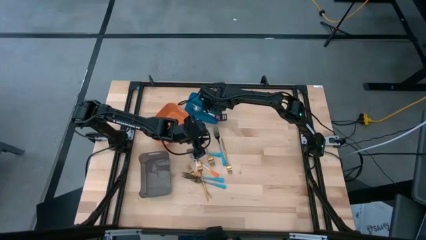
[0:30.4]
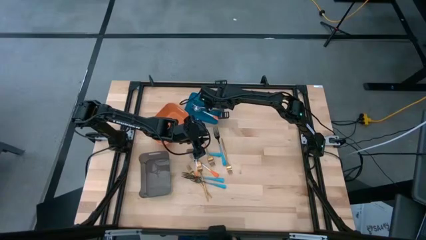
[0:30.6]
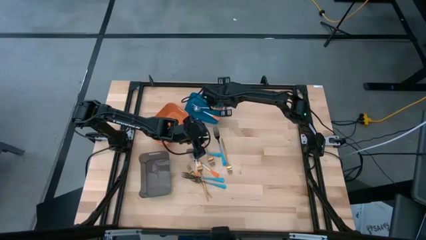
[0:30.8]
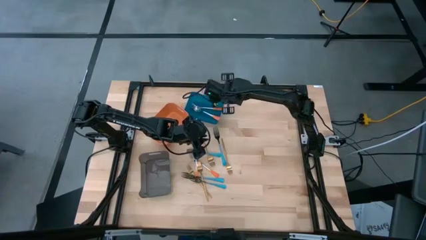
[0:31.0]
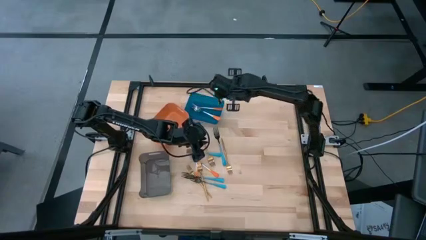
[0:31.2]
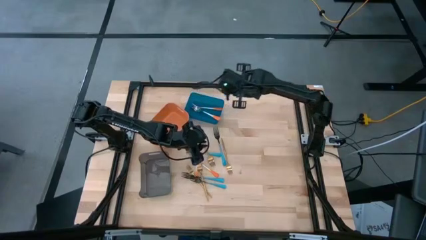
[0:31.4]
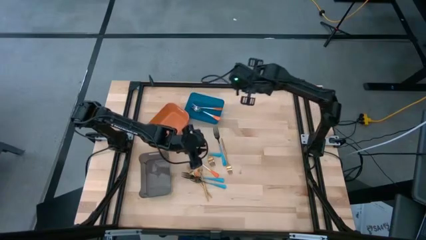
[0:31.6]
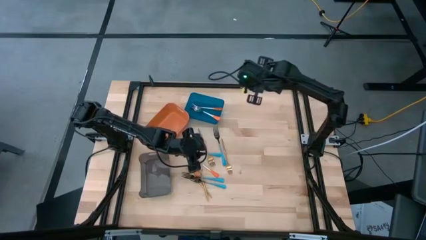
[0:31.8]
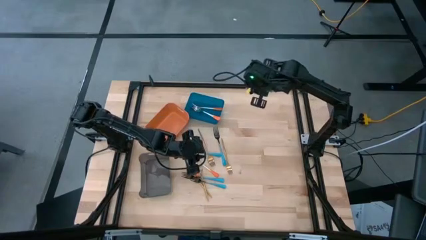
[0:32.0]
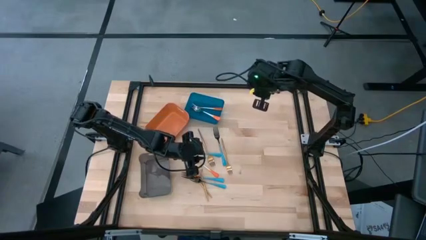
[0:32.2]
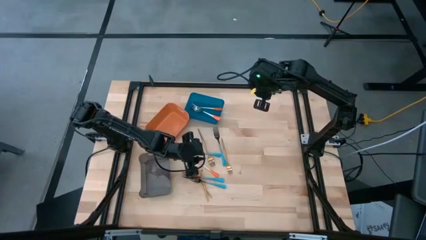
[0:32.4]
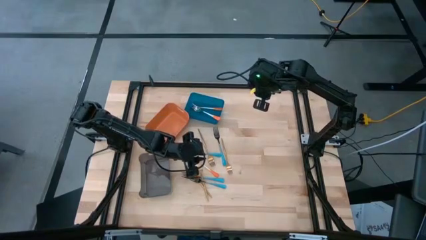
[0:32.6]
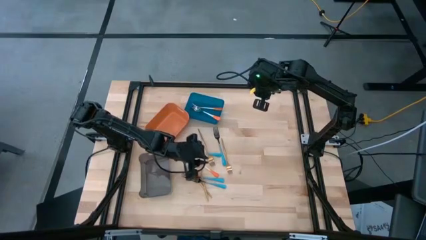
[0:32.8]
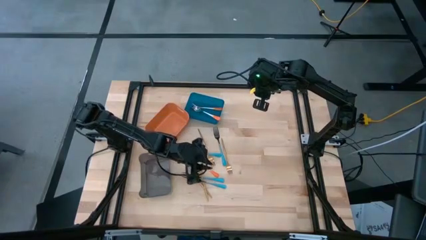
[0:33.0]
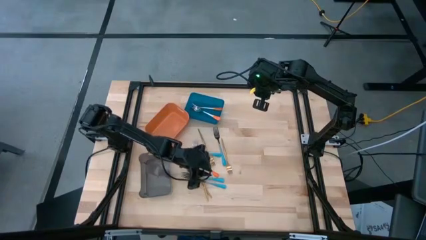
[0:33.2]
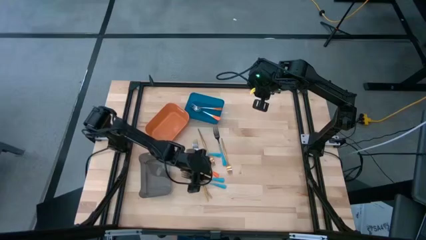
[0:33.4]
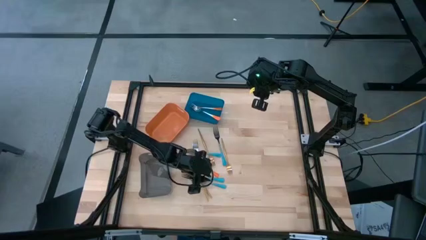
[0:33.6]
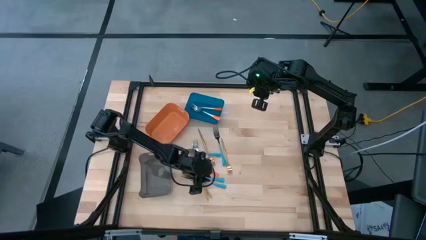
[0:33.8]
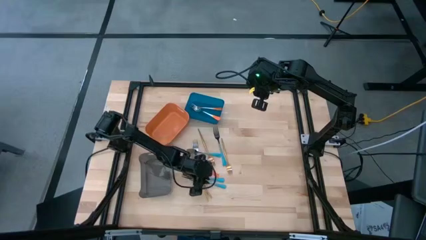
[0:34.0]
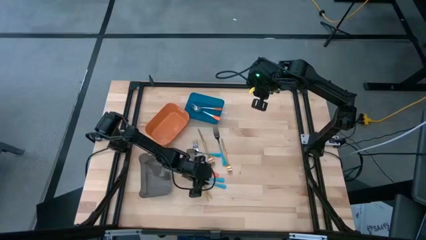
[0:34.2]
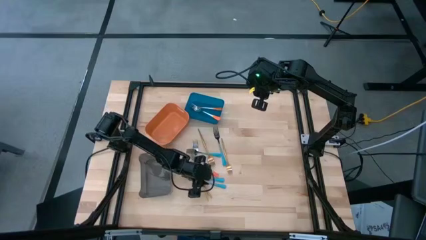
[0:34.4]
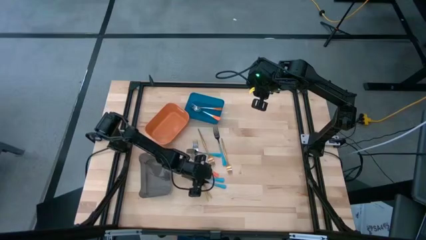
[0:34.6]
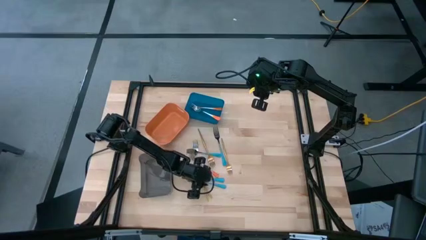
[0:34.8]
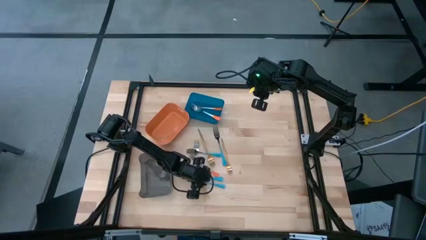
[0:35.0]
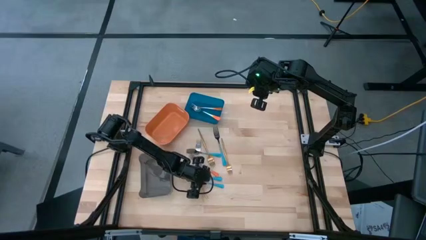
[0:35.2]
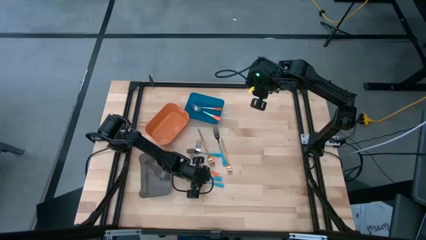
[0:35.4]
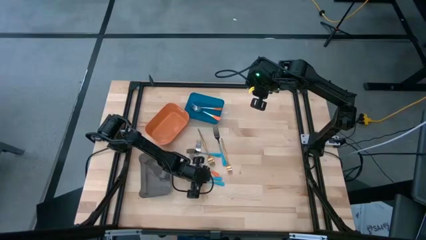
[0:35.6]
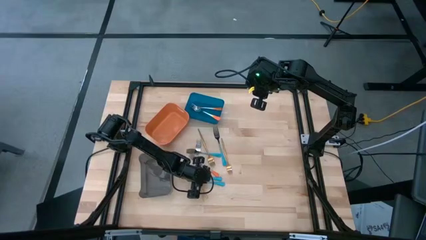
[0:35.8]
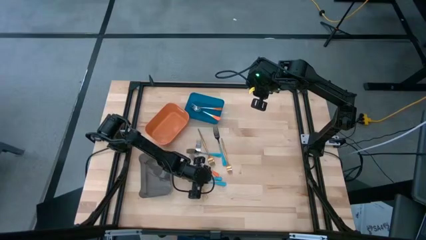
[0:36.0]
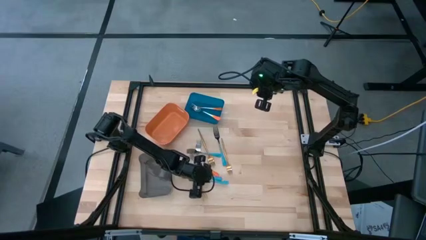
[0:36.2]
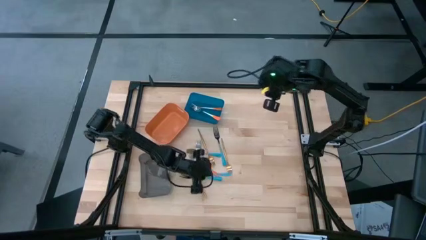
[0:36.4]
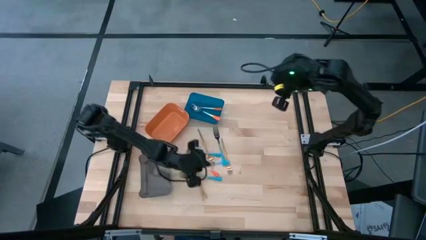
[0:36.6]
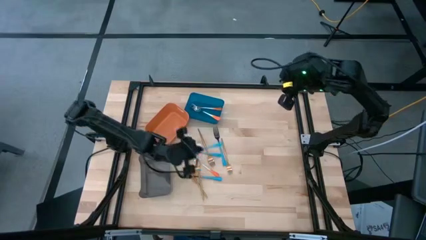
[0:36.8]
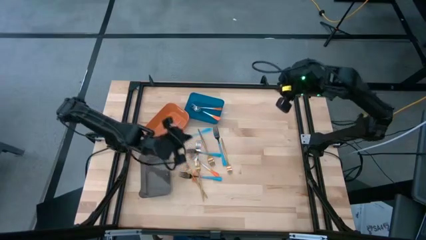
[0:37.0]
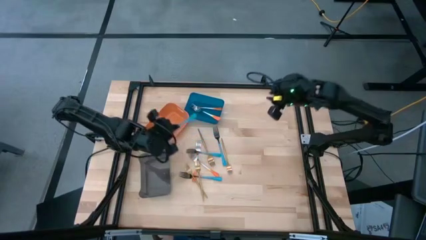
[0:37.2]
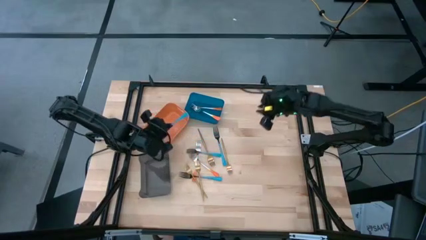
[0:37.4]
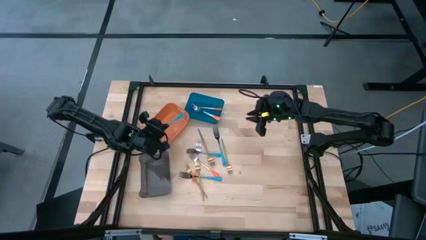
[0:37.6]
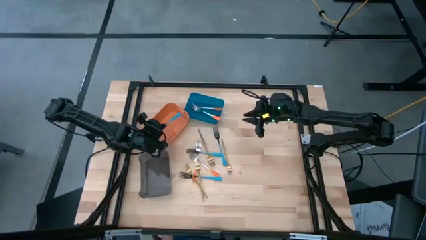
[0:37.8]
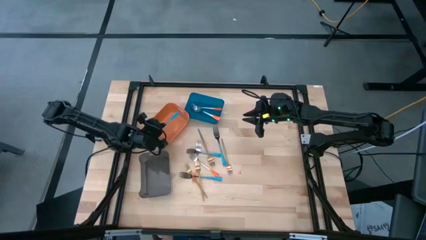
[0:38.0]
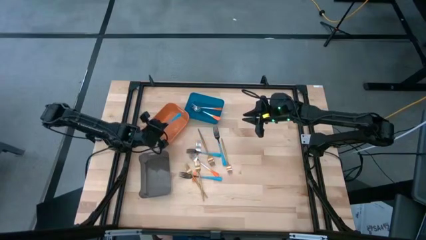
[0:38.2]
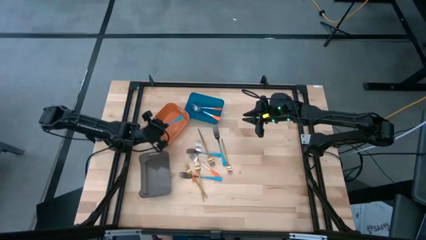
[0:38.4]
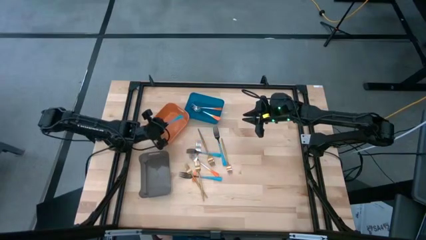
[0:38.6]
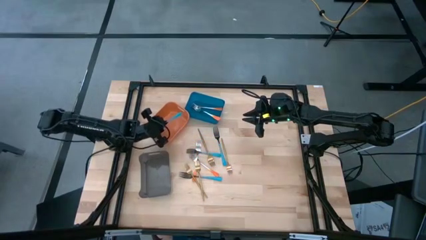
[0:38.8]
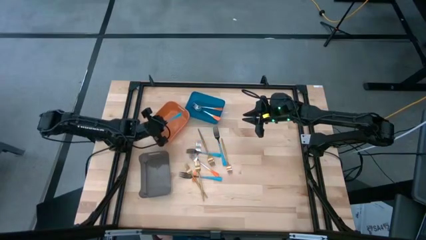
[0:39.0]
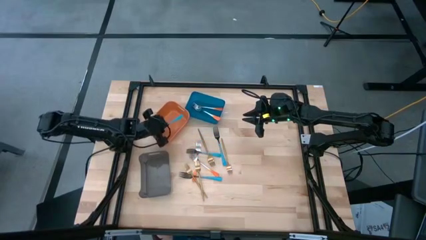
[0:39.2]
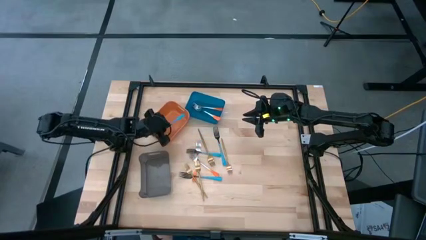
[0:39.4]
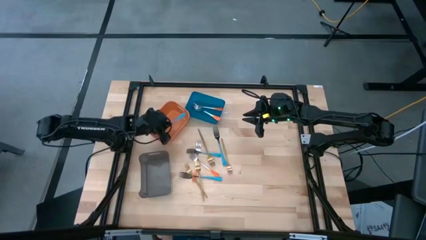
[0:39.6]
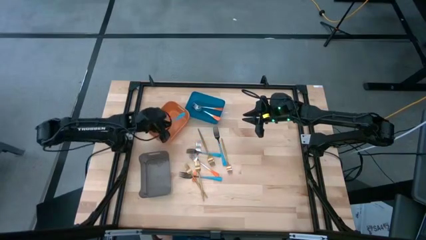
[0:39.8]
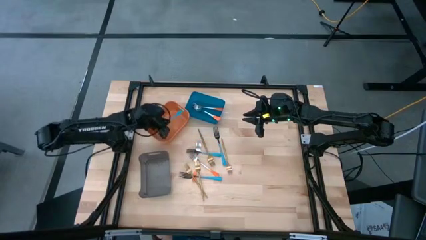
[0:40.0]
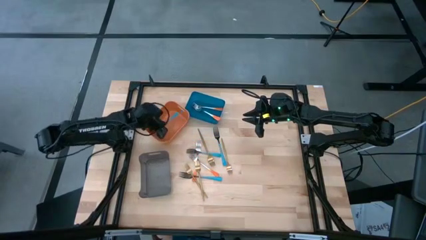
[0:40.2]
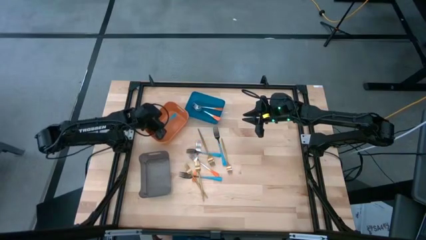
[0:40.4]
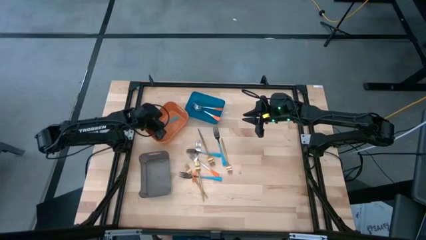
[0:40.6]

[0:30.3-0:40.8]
Task: Sort silverware by color (type)
Put the blue fork into the orange bin
